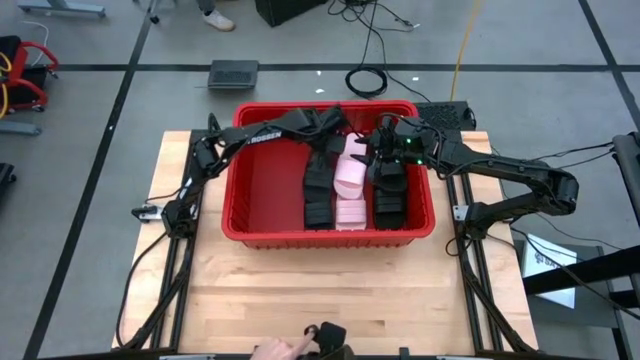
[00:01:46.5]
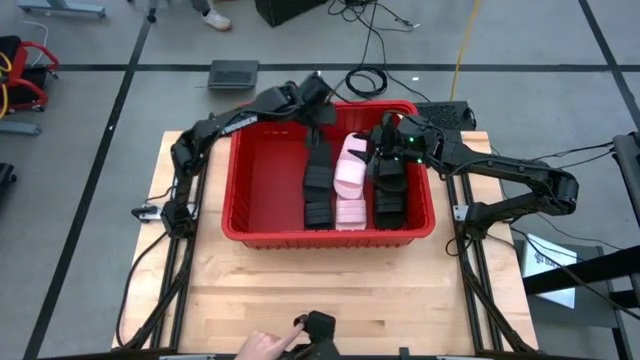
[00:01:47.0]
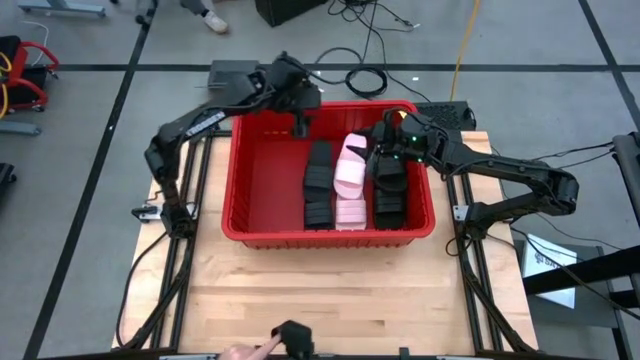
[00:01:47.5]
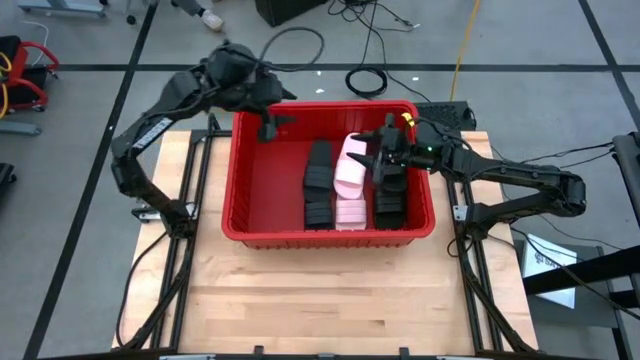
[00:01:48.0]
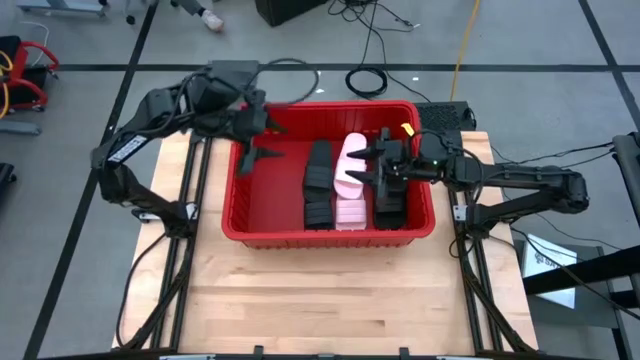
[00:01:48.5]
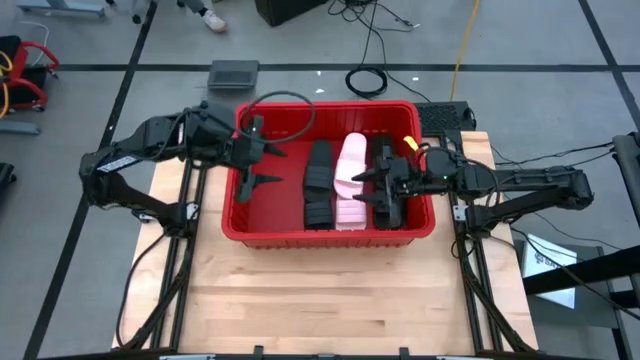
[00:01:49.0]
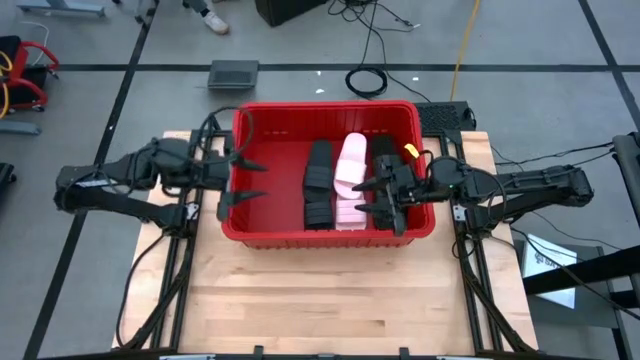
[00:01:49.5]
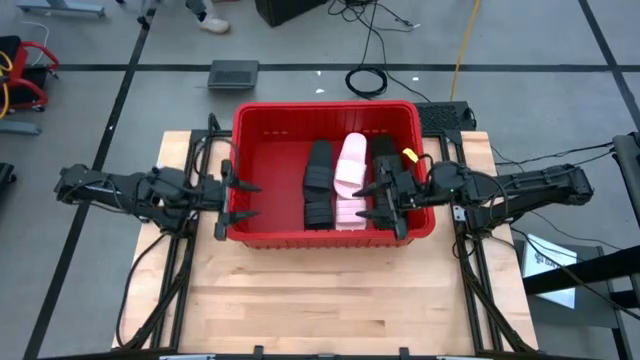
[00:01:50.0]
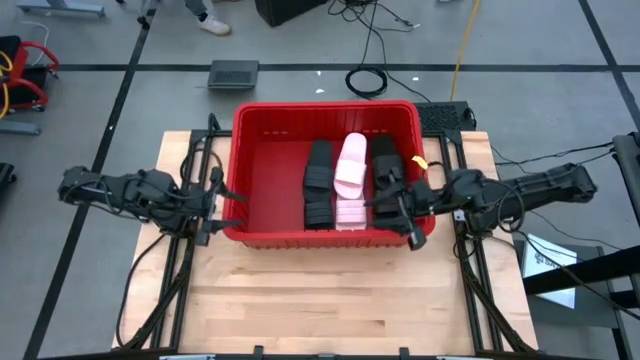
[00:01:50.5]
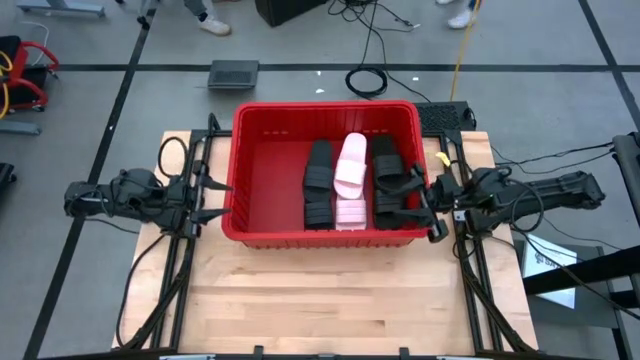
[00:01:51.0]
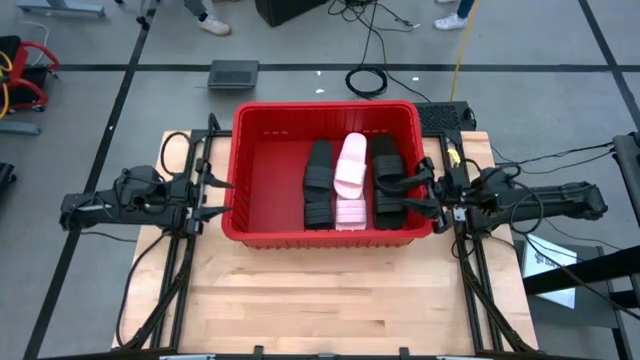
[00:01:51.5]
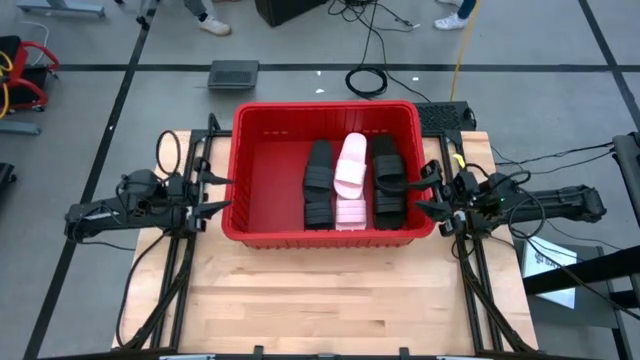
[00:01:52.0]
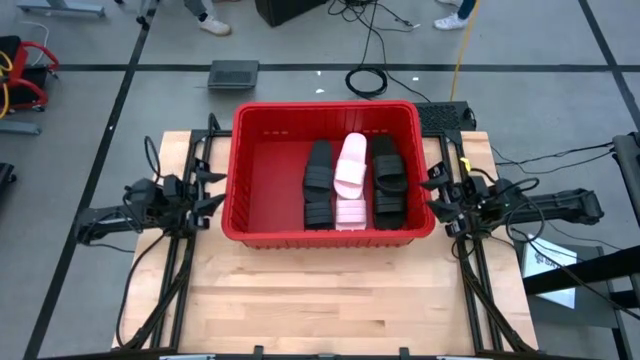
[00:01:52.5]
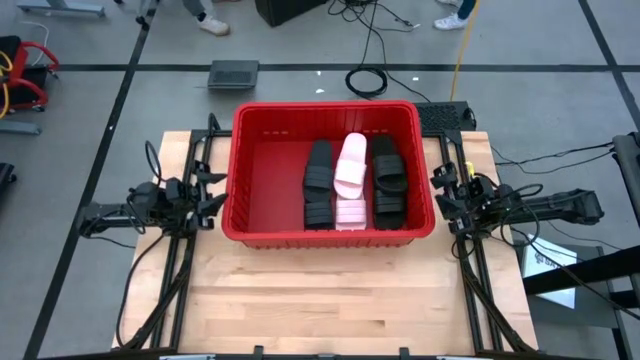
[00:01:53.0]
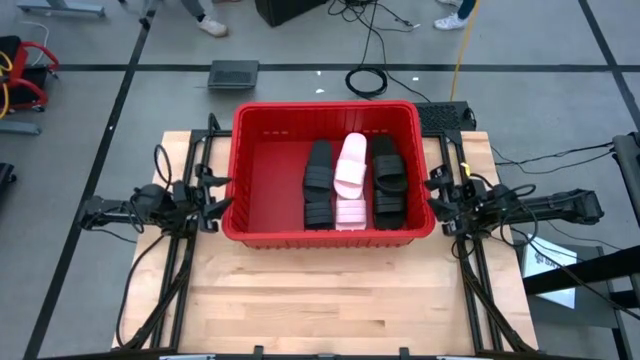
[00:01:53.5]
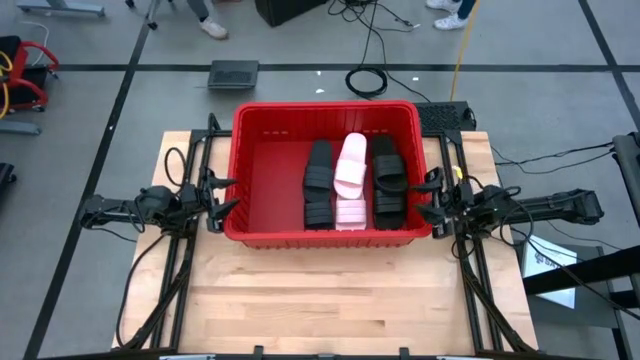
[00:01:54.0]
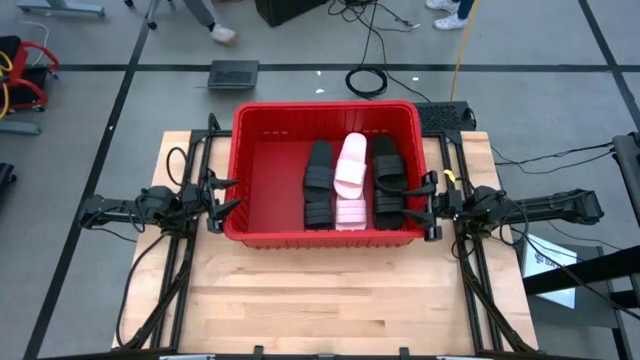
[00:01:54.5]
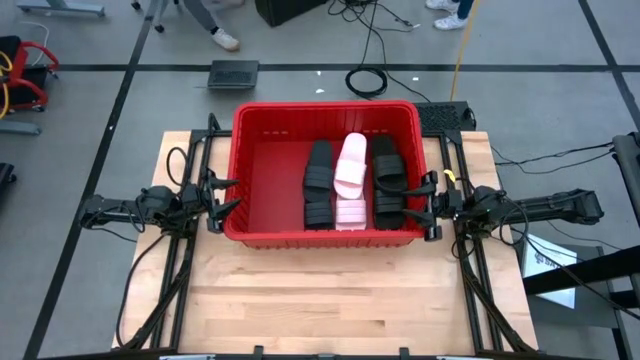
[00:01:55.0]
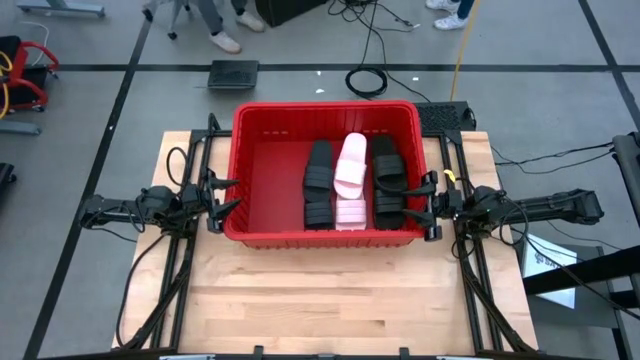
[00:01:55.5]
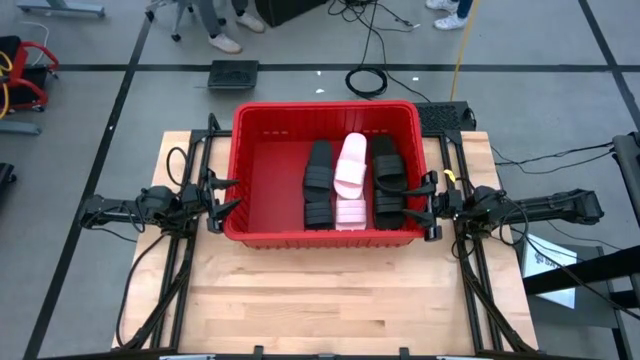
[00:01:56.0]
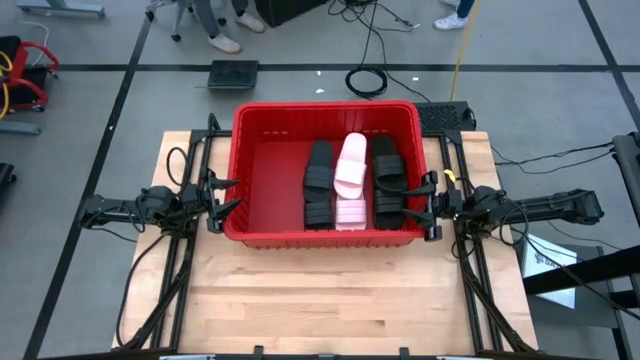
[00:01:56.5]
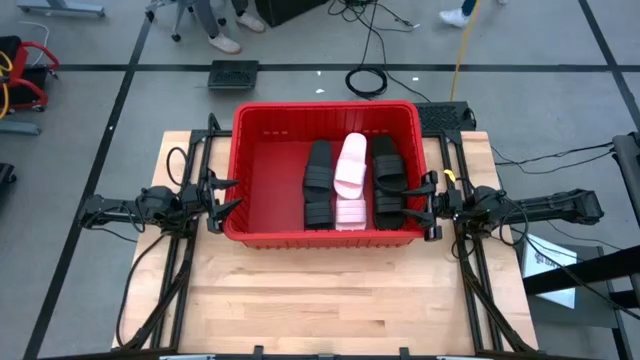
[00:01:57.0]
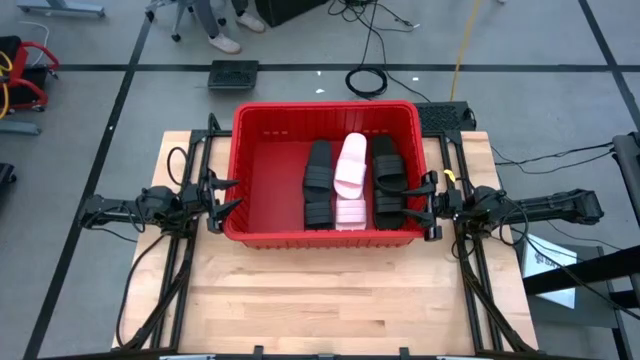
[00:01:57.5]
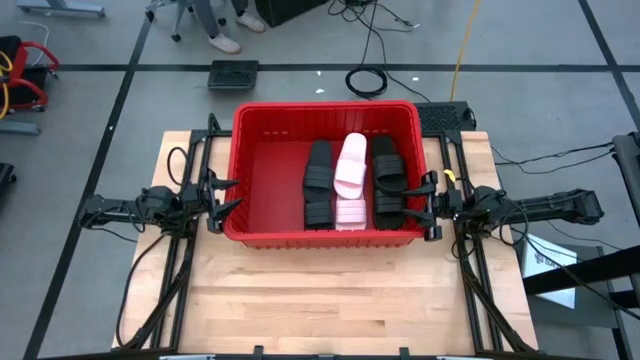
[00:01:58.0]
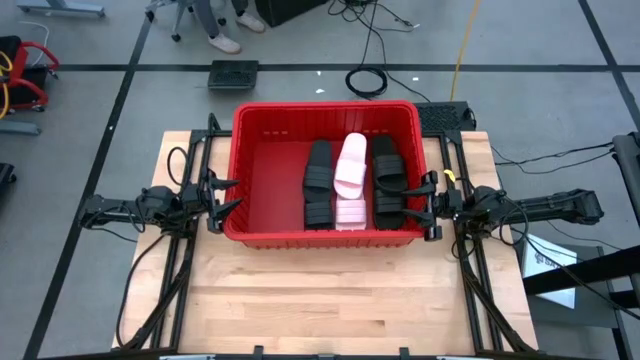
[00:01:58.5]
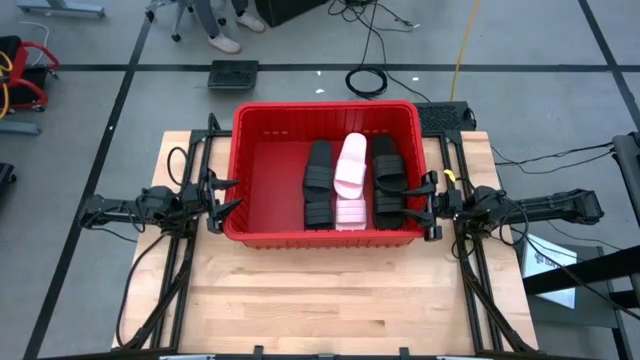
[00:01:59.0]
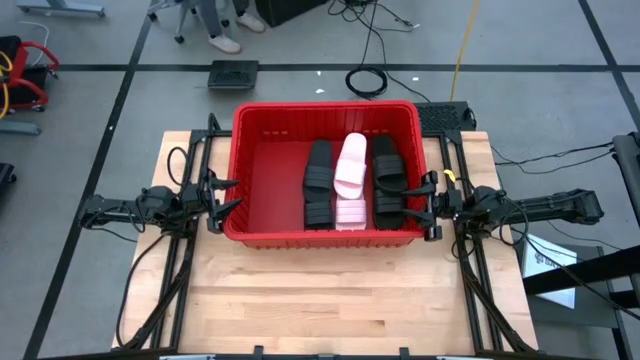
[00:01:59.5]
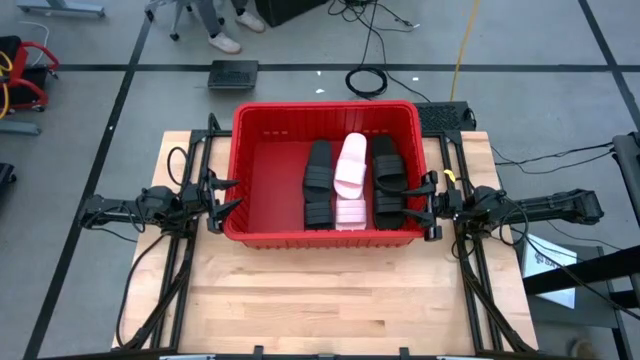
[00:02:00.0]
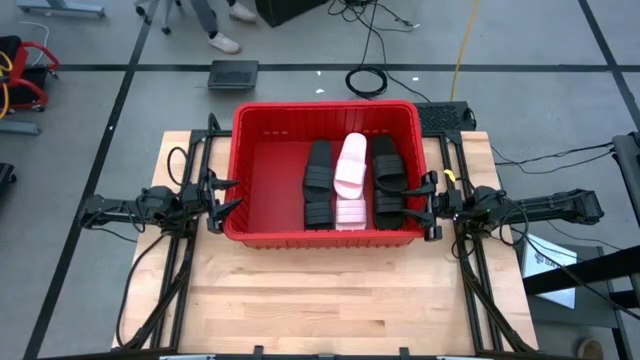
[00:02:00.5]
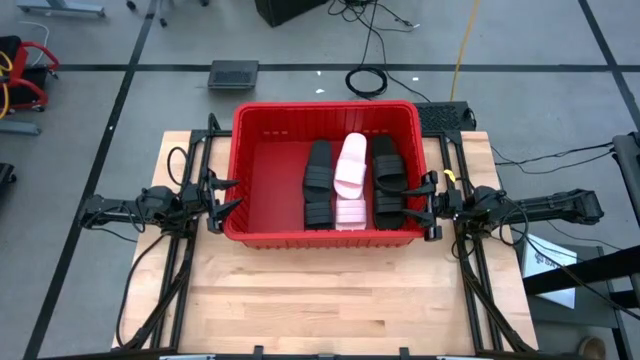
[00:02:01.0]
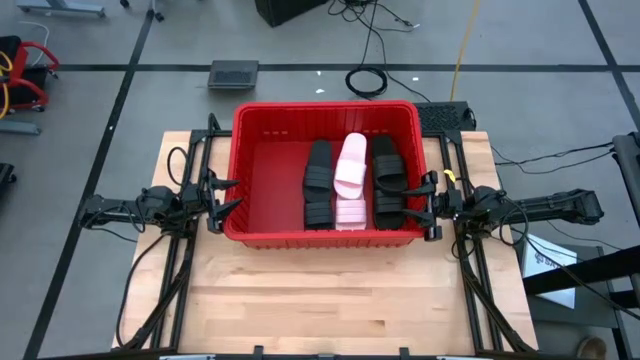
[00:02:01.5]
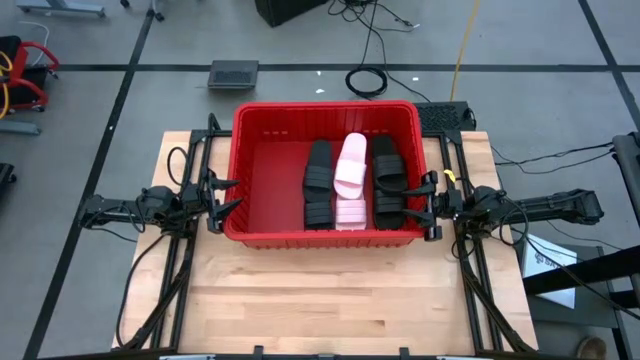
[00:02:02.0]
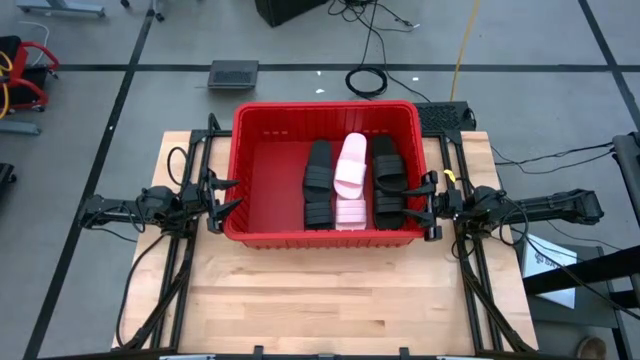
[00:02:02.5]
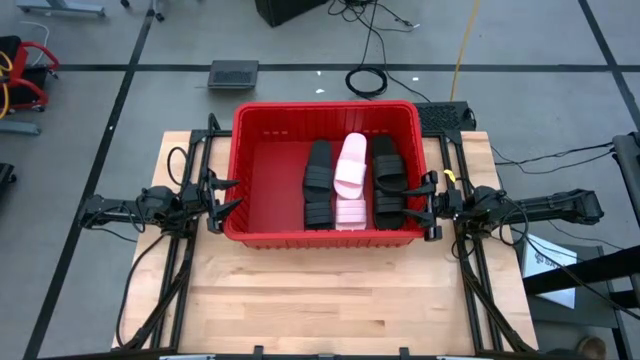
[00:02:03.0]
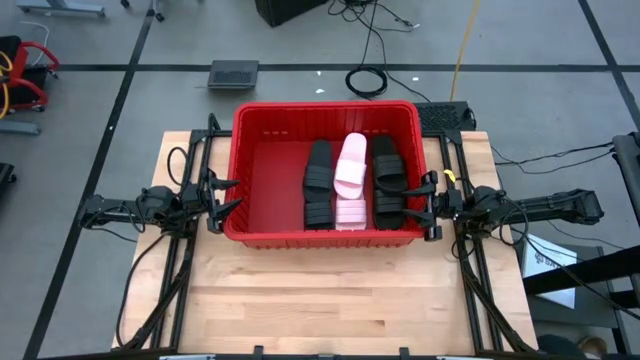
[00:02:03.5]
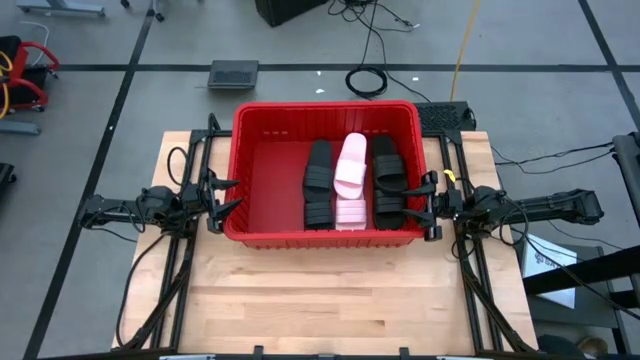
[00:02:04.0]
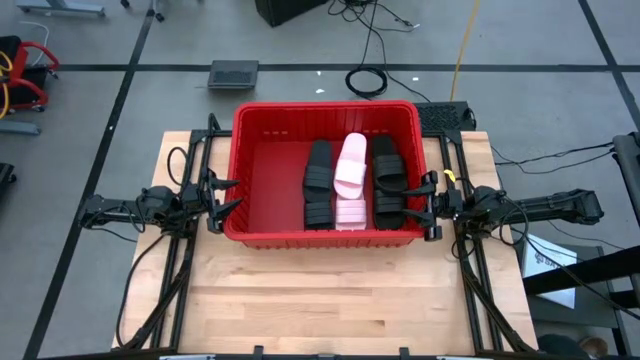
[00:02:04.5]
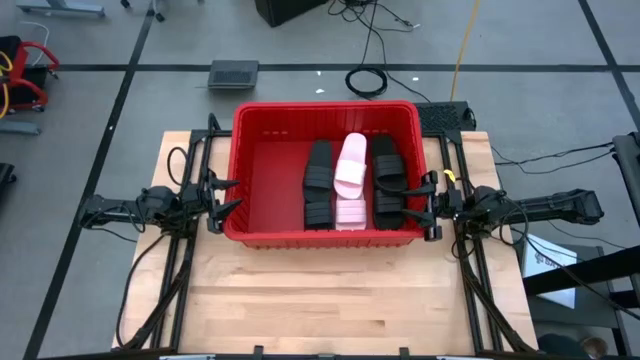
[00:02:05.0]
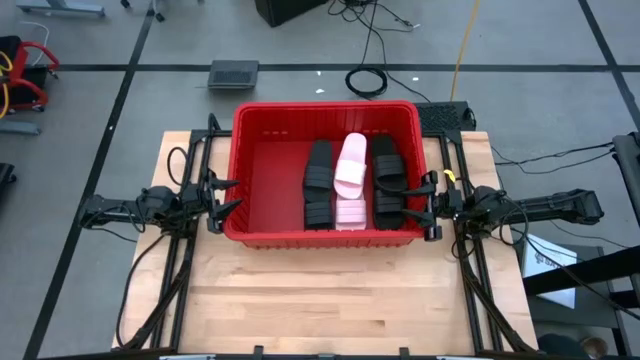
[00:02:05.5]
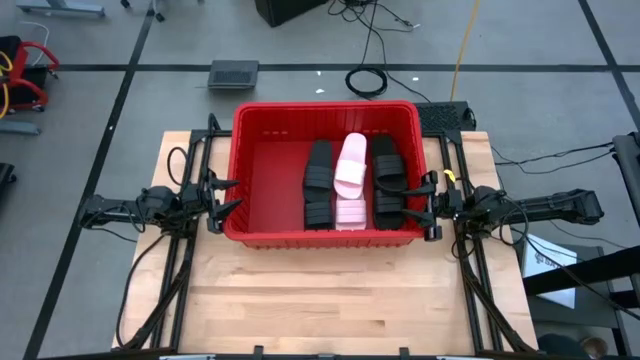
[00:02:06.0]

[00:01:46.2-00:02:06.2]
Task: Pick and place slides into bin
Return to Home Position

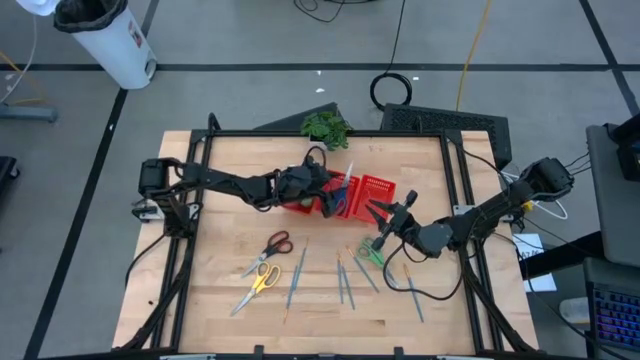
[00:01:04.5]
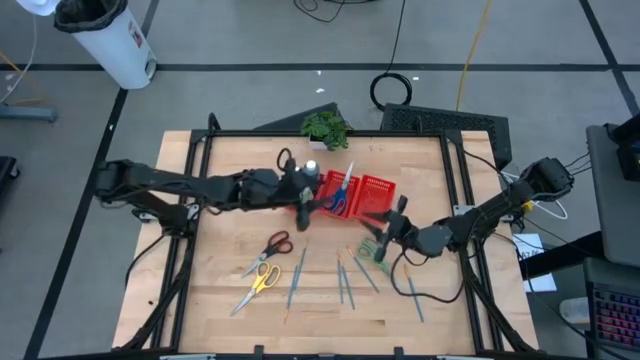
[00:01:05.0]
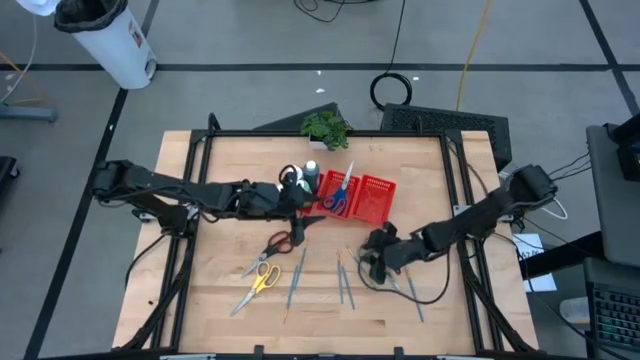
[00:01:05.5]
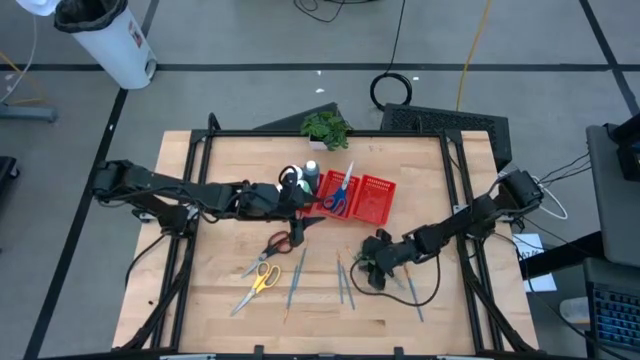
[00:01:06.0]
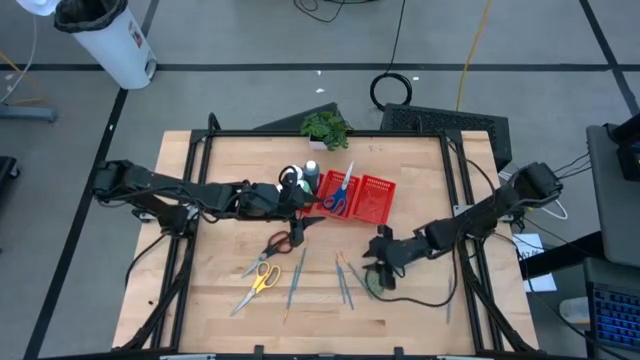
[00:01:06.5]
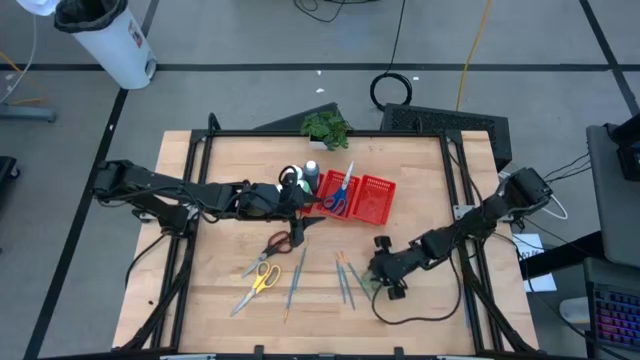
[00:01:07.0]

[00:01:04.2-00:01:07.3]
Task: Pick & Place Paint Supplies
Adjust the green scissors on the table
